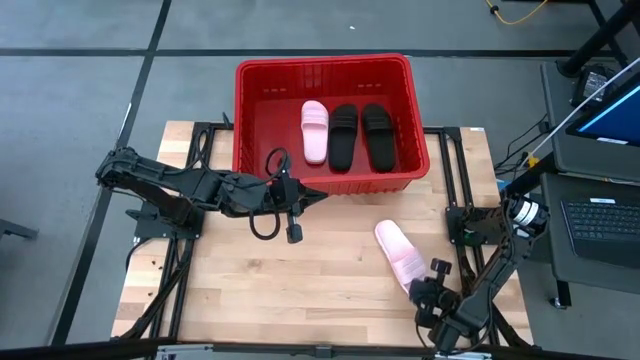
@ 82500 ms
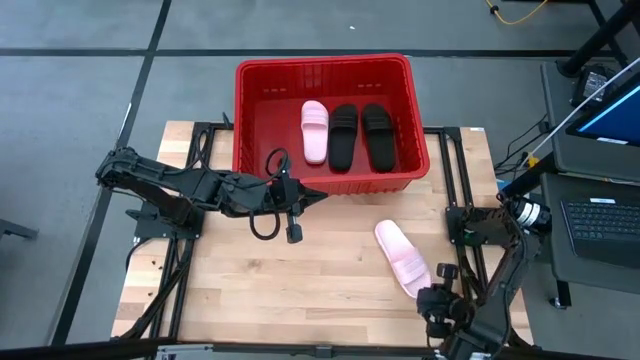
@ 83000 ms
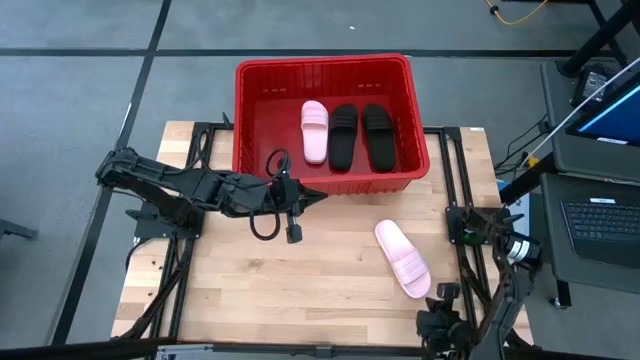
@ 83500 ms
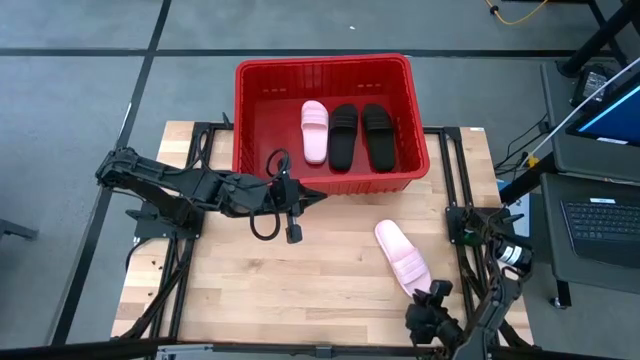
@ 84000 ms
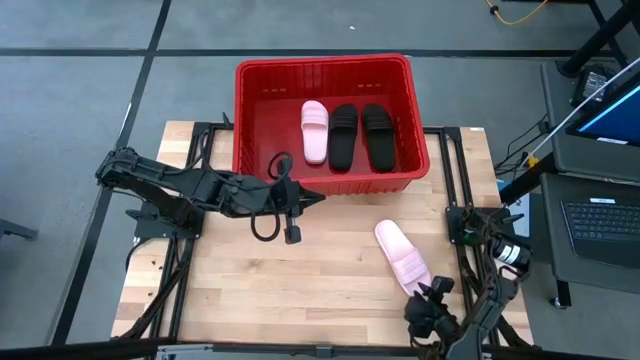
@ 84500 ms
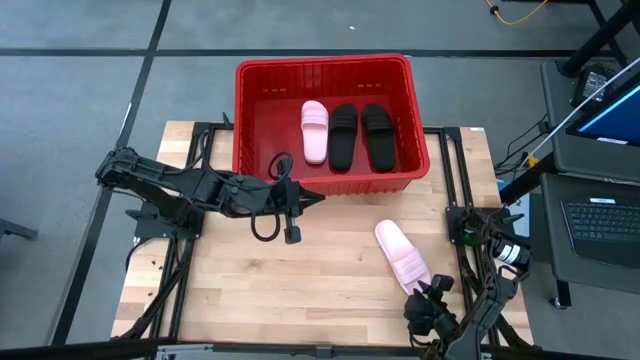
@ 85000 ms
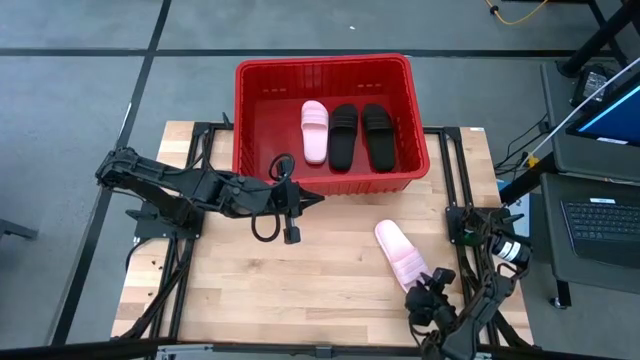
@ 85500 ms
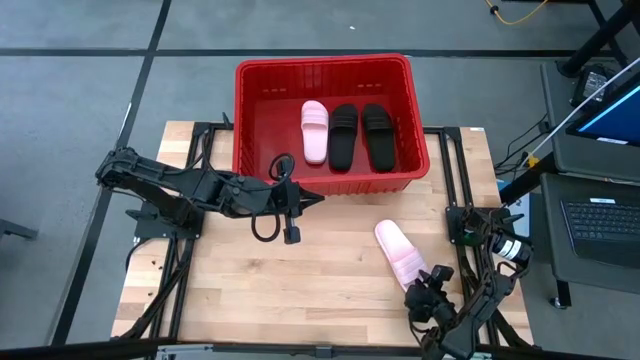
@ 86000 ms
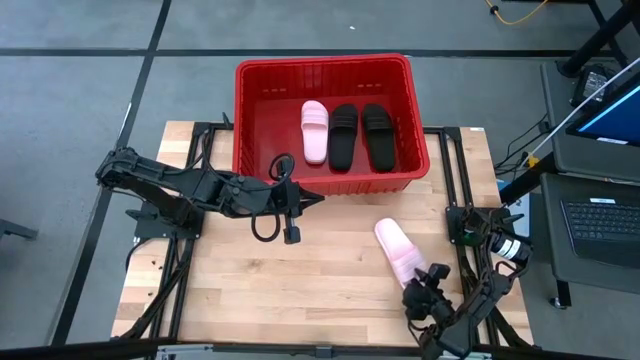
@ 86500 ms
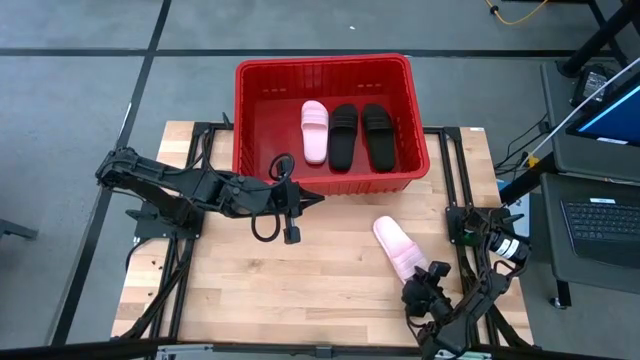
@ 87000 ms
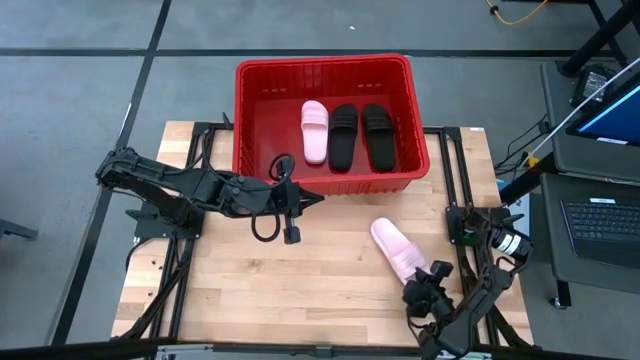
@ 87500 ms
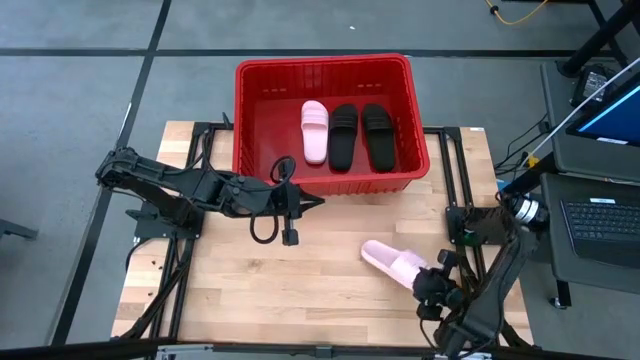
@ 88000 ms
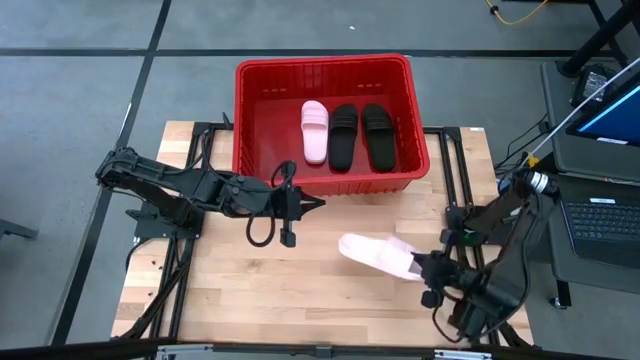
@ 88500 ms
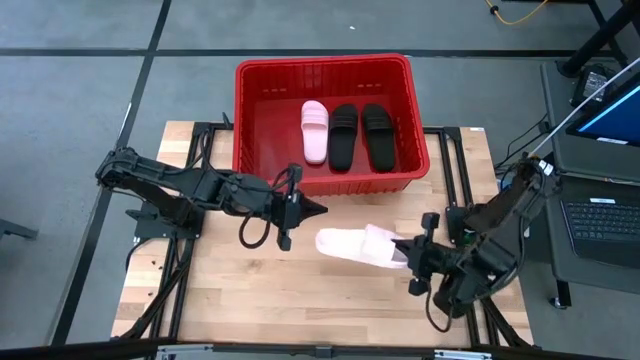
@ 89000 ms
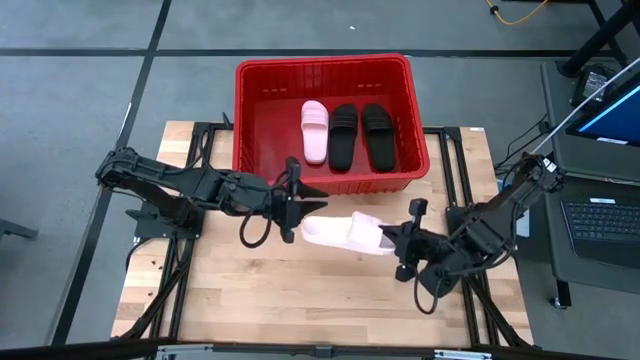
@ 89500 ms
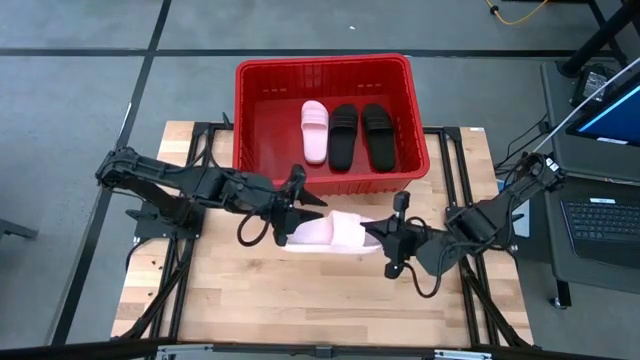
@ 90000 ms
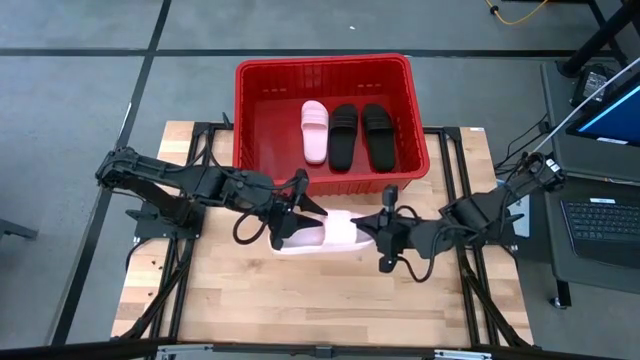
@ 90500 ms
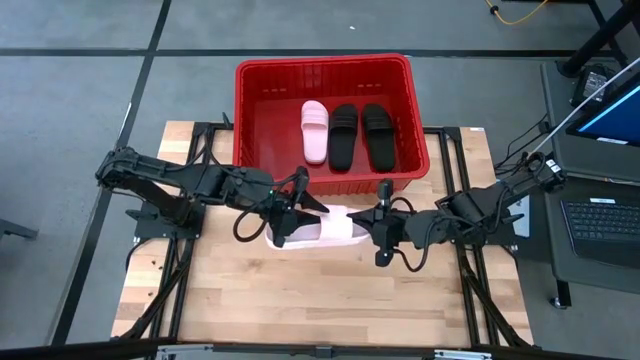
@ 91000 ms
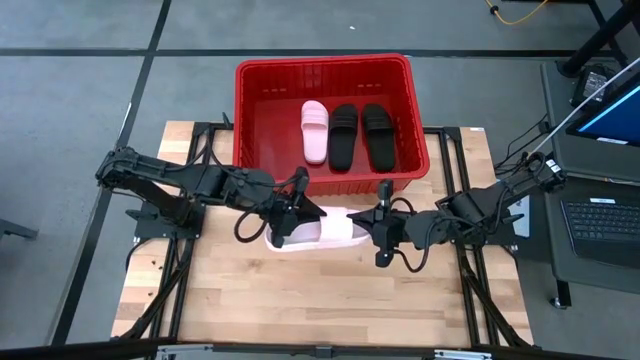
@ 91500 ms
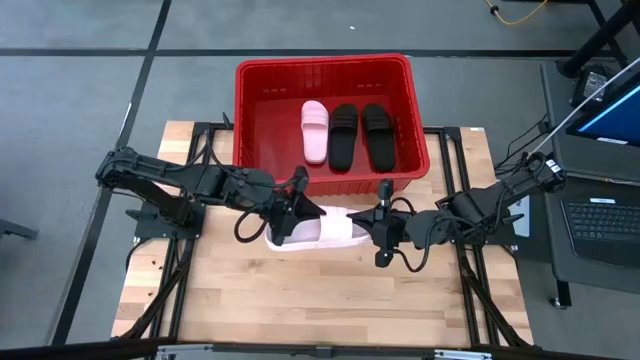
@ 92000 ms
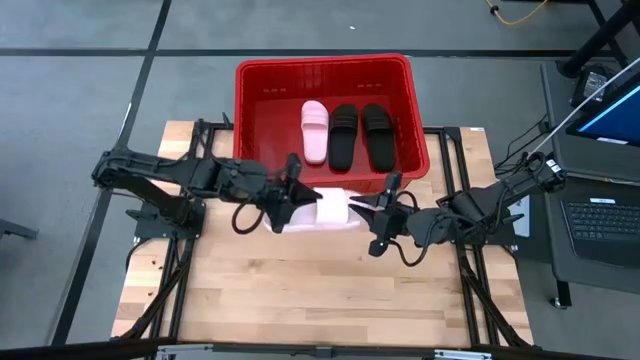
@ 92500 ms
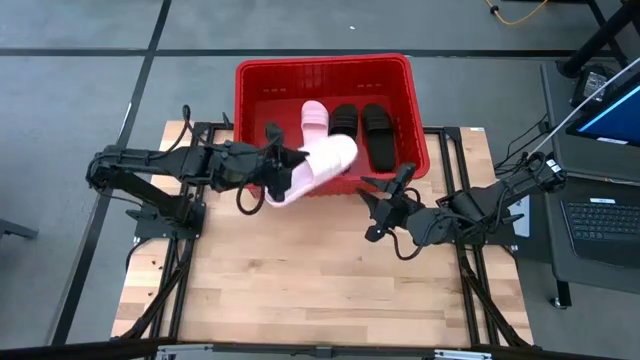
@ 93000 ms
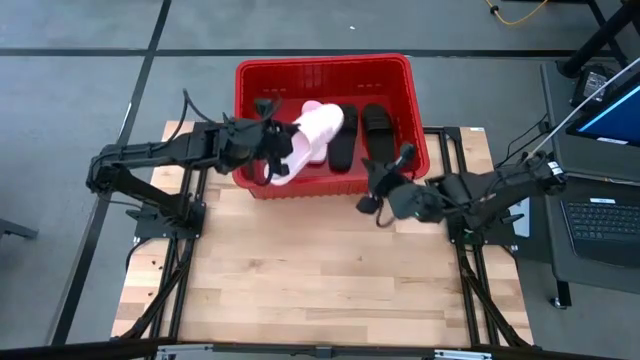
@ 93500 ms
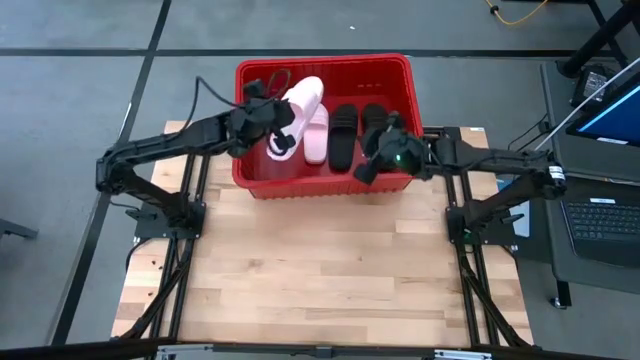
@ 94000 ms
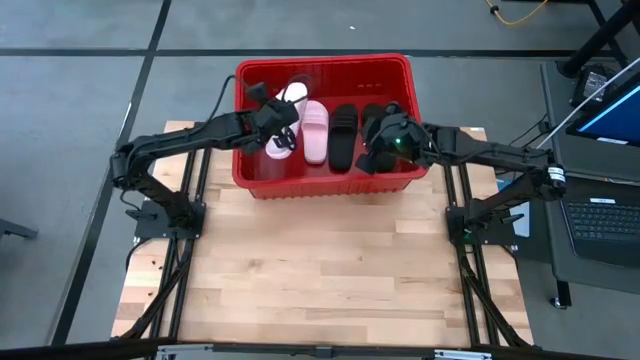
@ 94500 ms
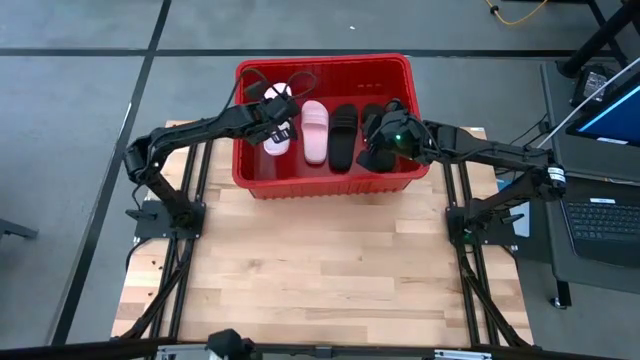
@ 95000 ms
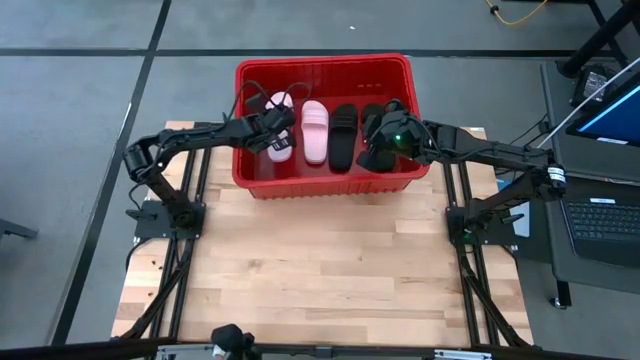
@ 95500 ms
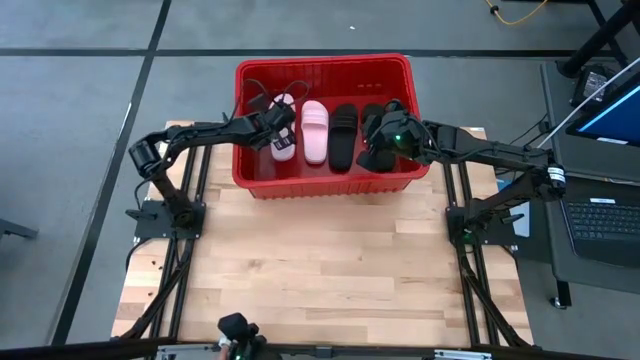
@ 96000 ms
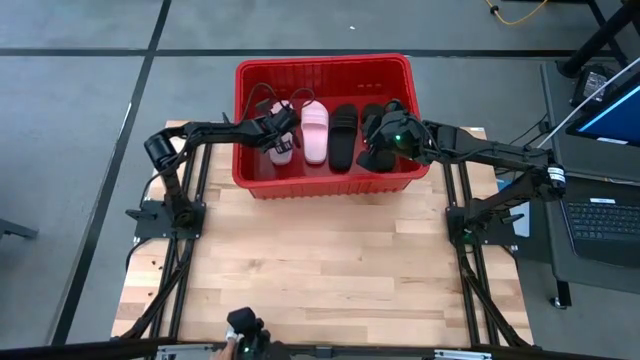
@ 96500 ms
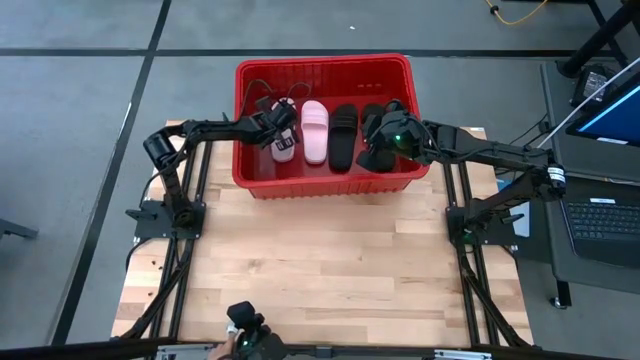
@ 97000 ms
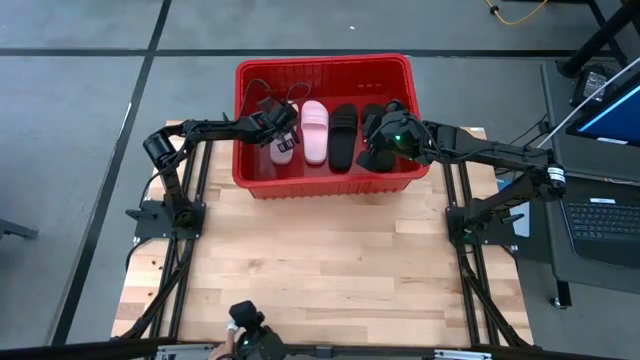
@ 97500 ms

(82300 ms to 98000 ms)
Task: Pick and place slides into bin
Put the pink slide into the bin

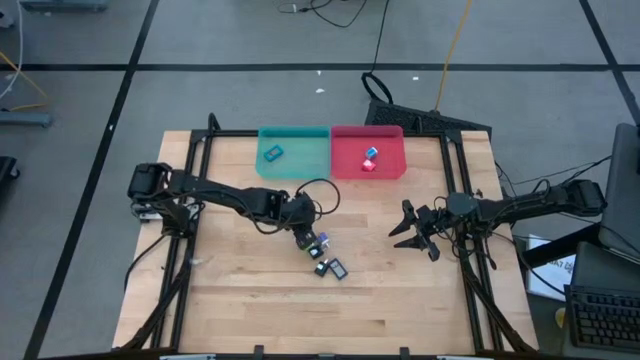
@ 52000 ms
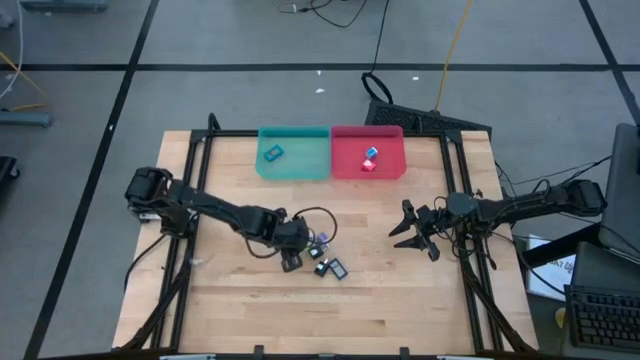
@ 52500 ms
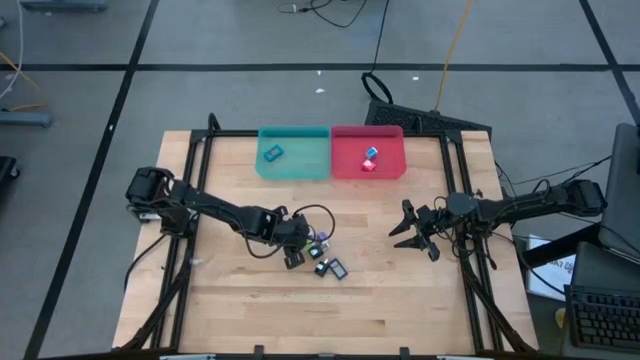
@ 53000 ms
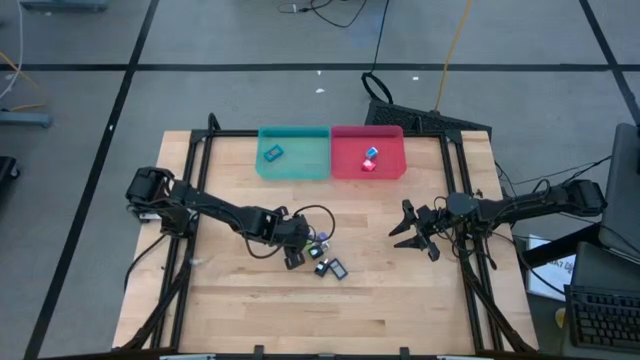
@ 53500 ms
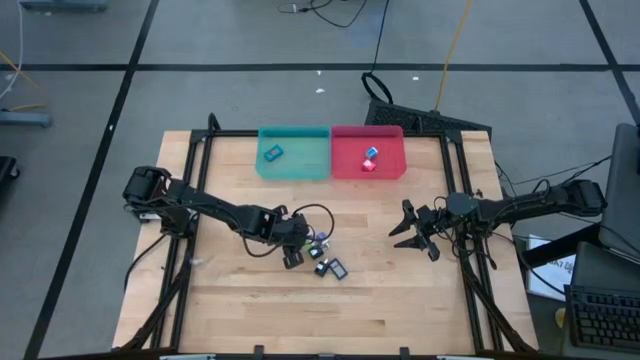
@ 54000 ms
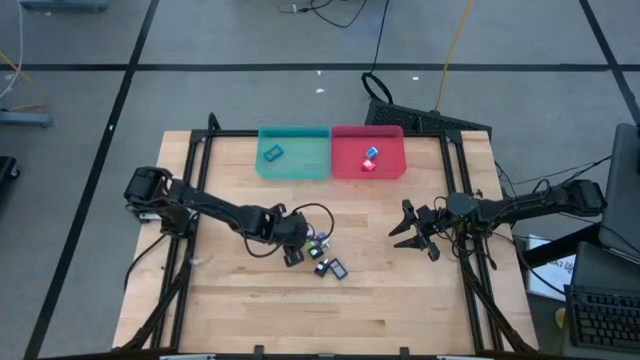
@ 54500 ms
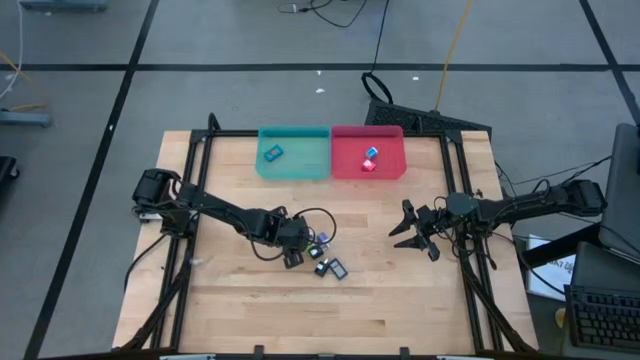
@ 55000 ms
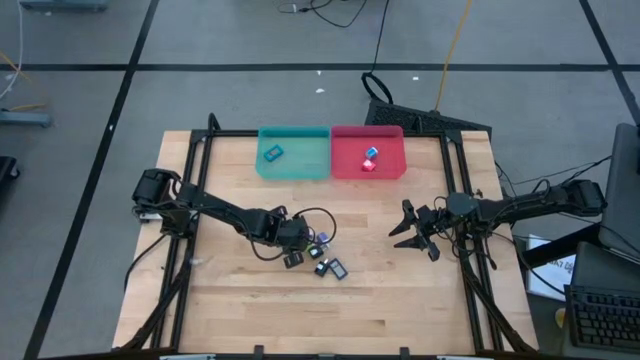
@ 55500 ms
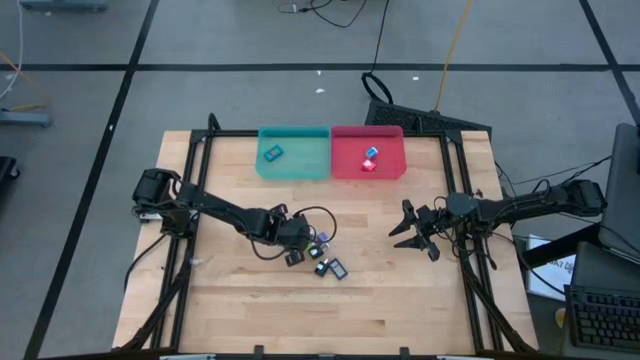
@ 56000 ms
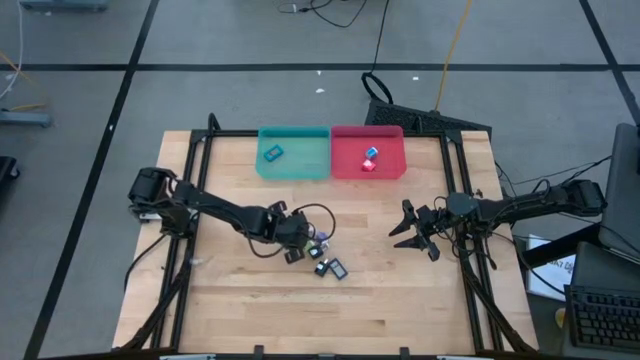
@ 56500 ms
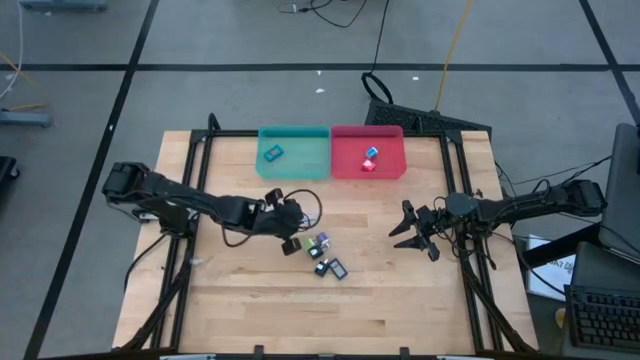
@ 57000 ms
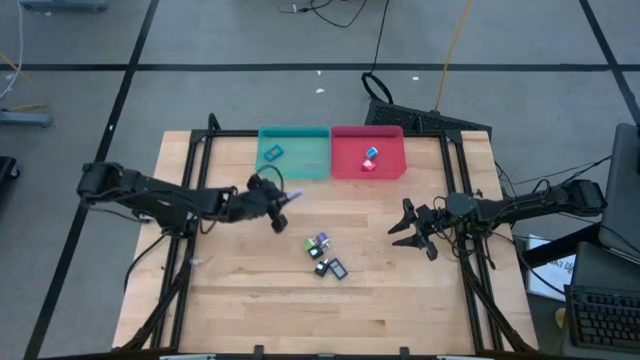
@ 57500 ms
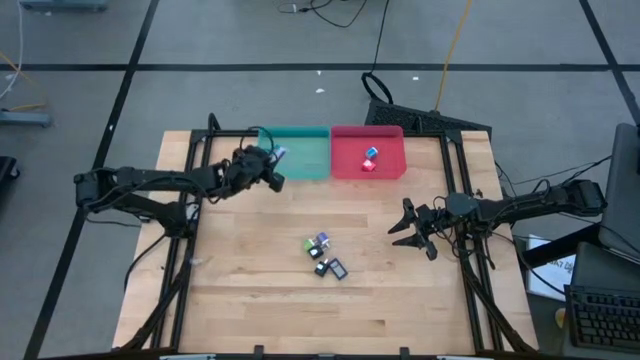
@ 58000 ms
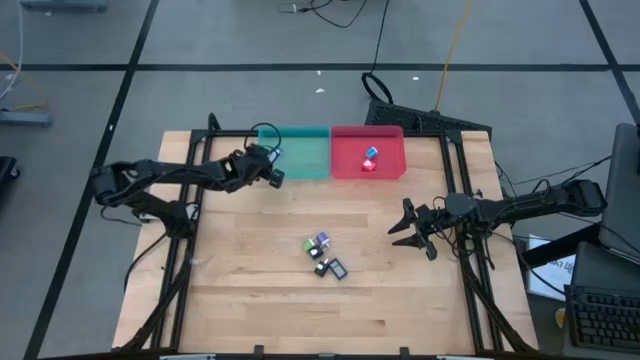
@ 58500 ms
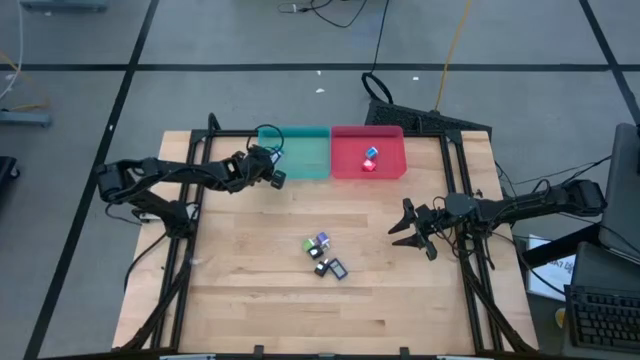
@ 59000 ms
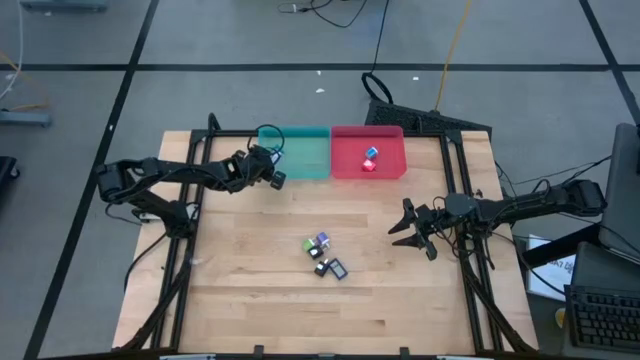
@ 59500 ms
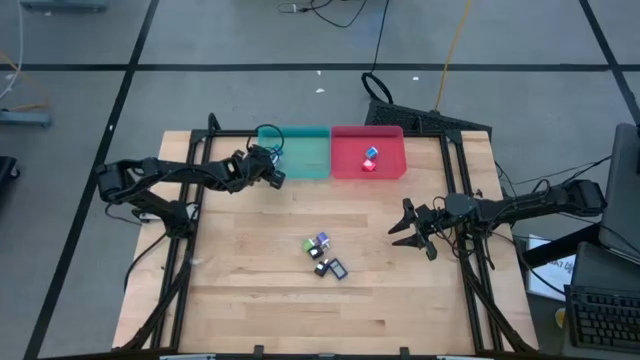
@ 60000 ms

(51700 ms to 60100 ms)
Task: Sort charging adapters and watches
Put the white watch in the blue bin
